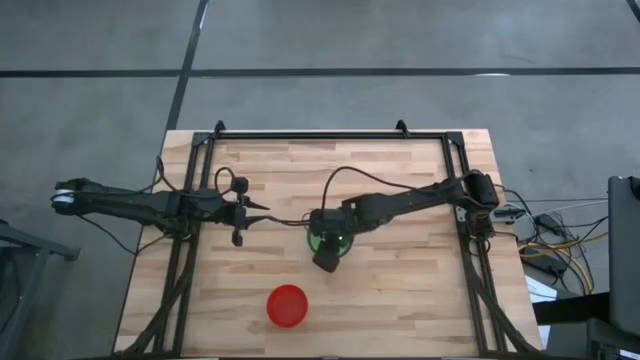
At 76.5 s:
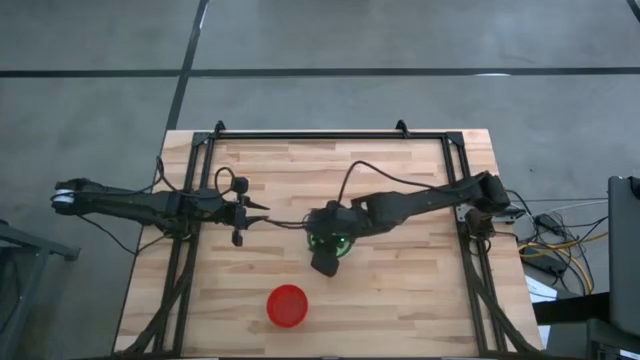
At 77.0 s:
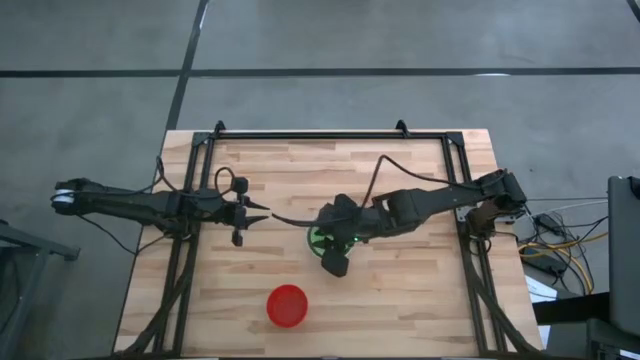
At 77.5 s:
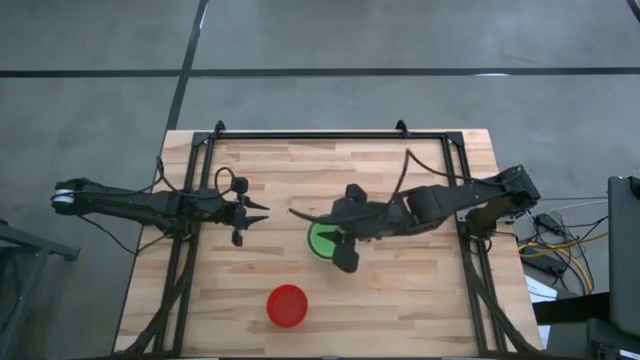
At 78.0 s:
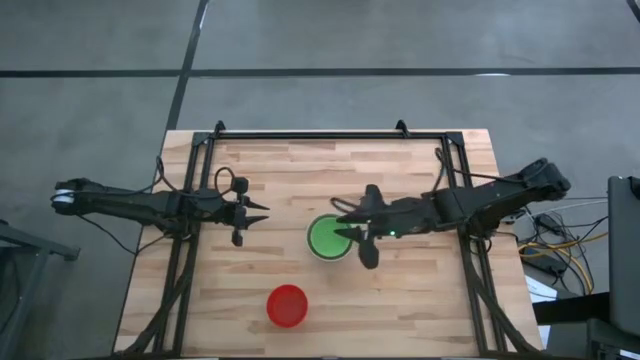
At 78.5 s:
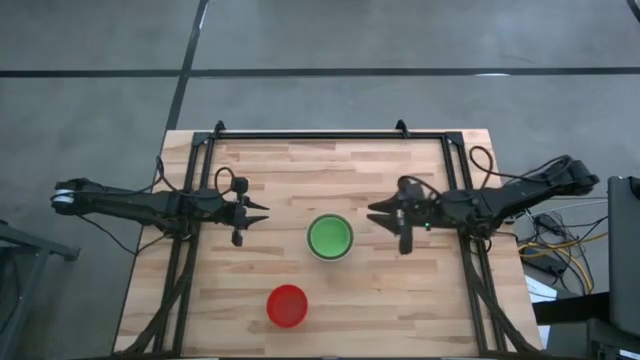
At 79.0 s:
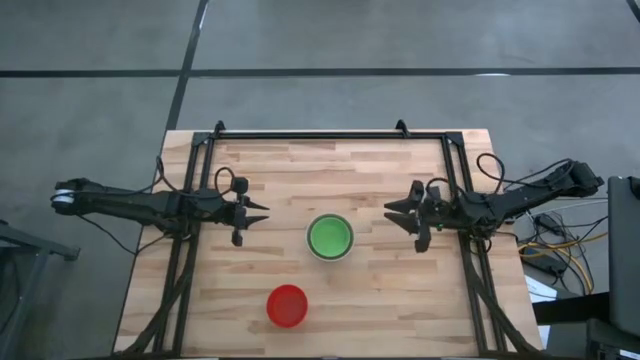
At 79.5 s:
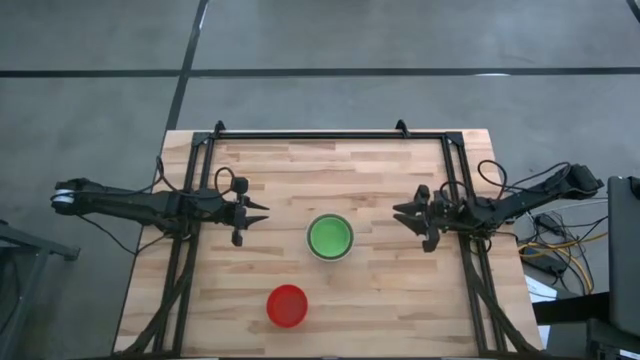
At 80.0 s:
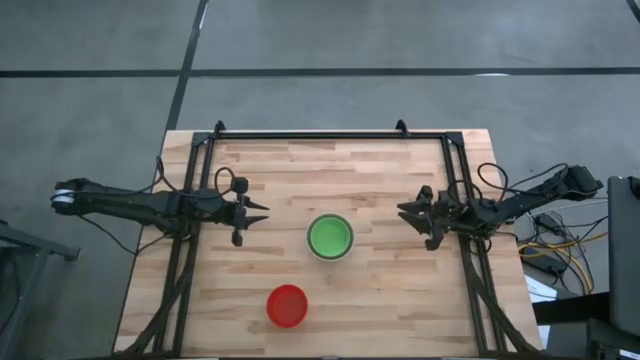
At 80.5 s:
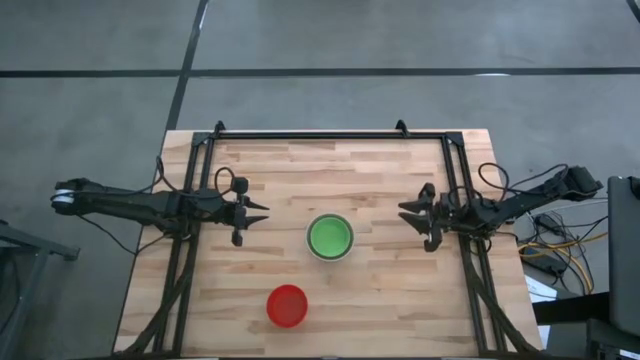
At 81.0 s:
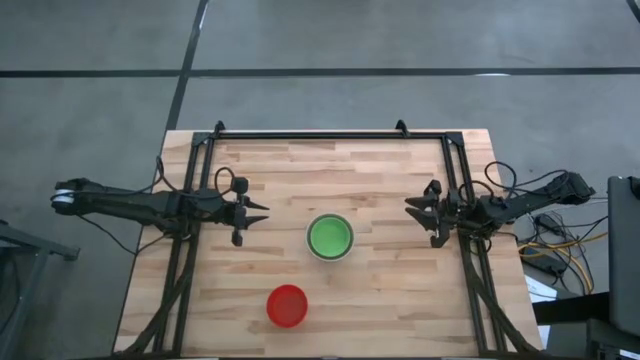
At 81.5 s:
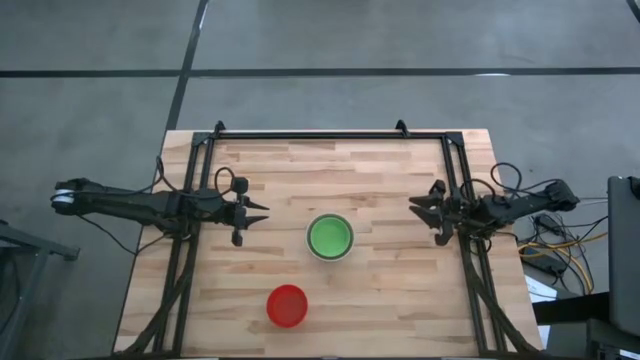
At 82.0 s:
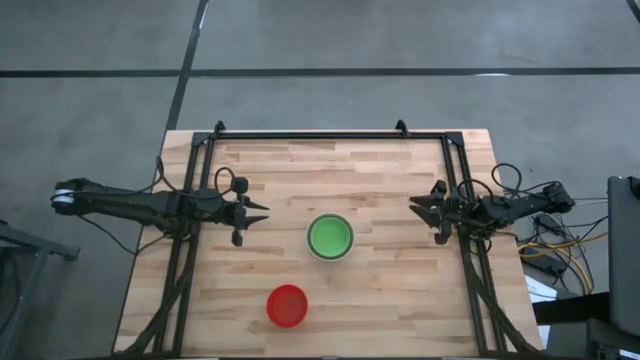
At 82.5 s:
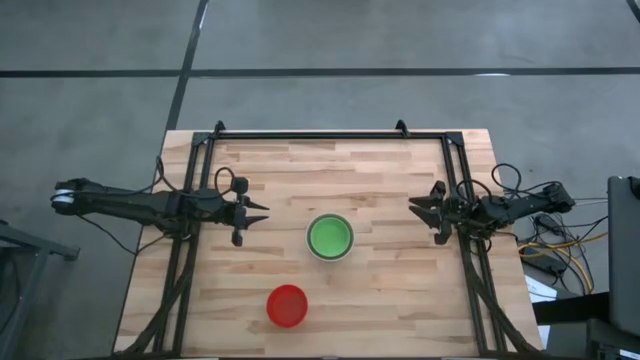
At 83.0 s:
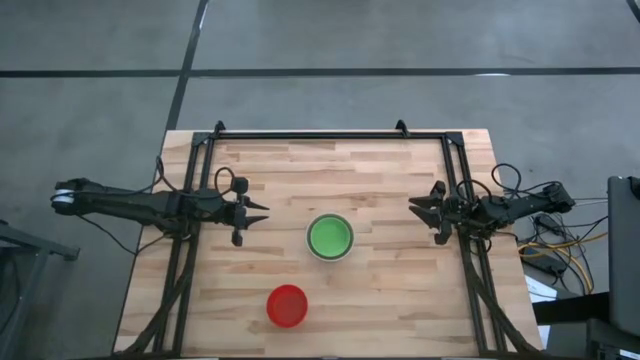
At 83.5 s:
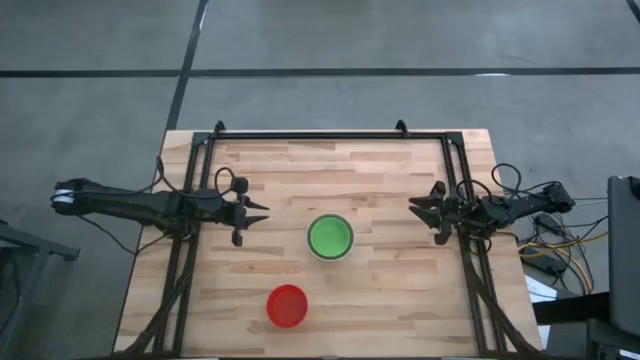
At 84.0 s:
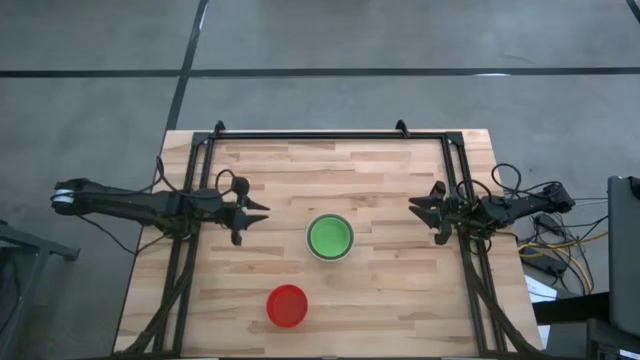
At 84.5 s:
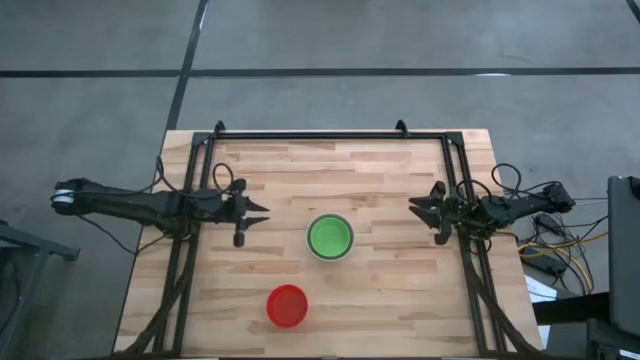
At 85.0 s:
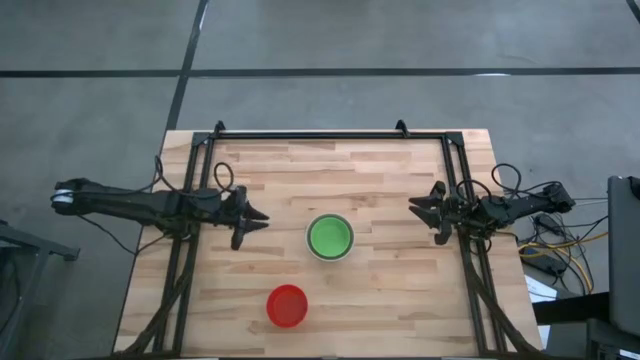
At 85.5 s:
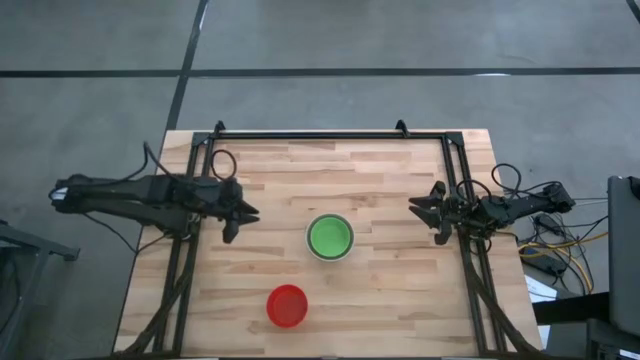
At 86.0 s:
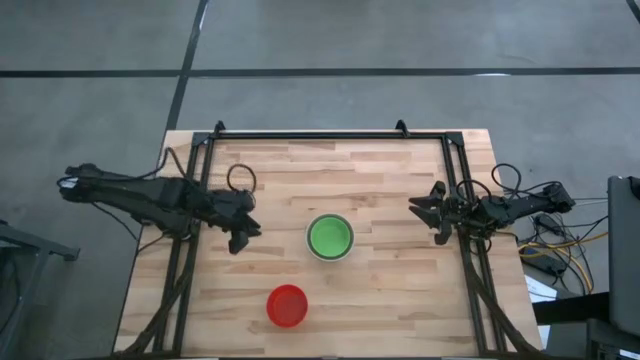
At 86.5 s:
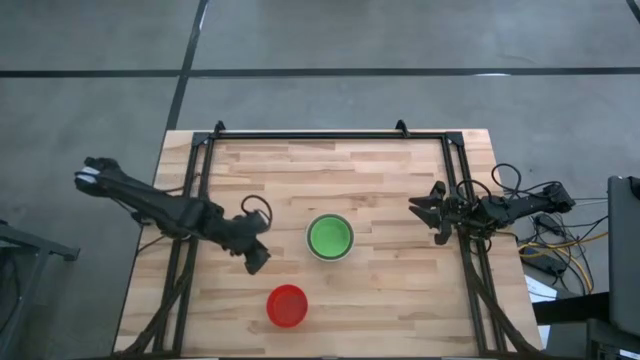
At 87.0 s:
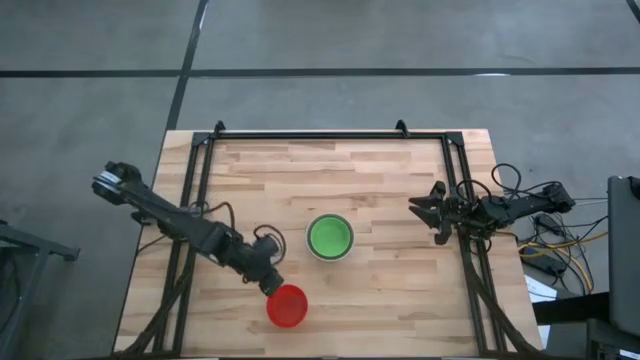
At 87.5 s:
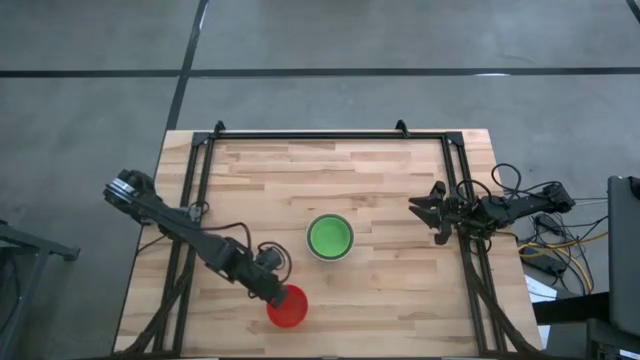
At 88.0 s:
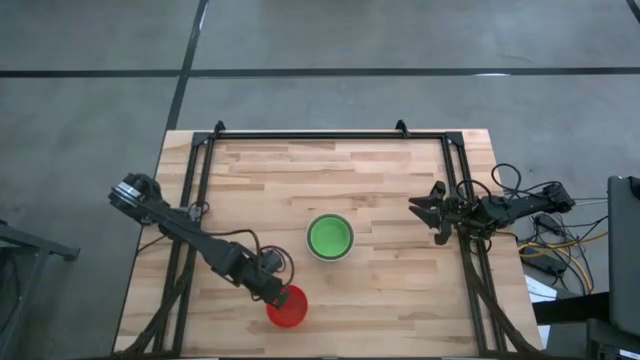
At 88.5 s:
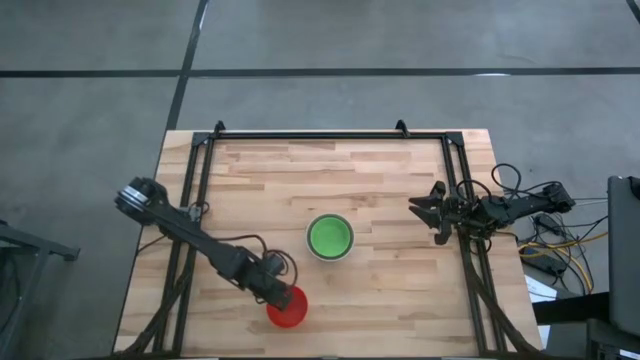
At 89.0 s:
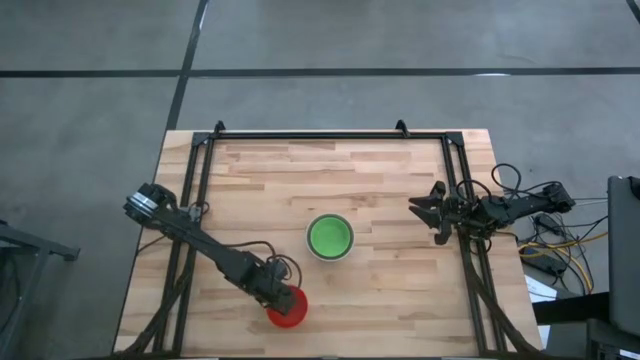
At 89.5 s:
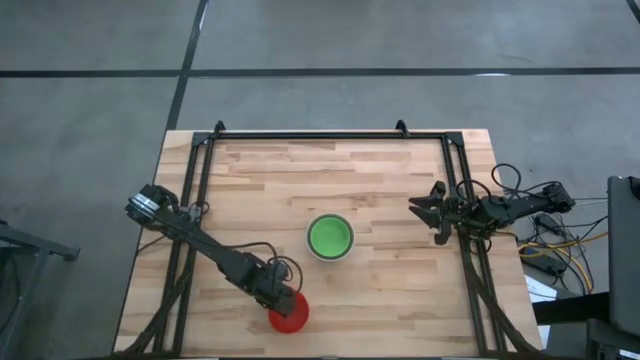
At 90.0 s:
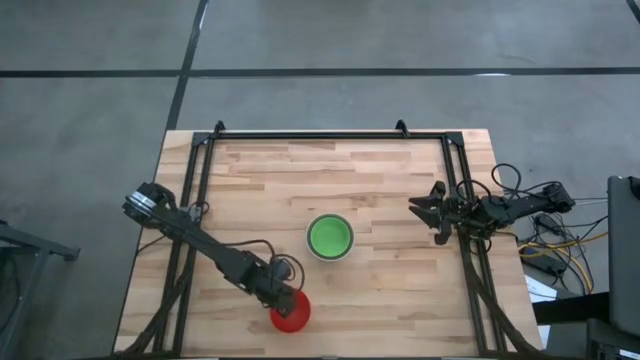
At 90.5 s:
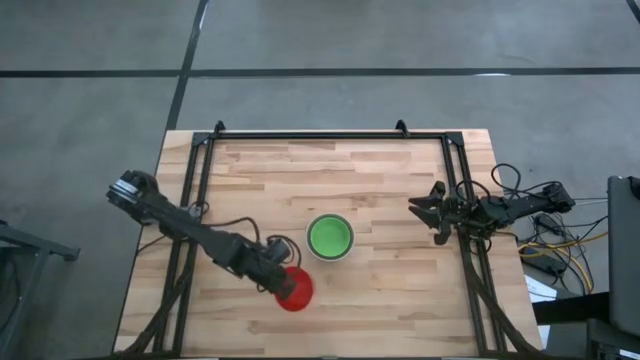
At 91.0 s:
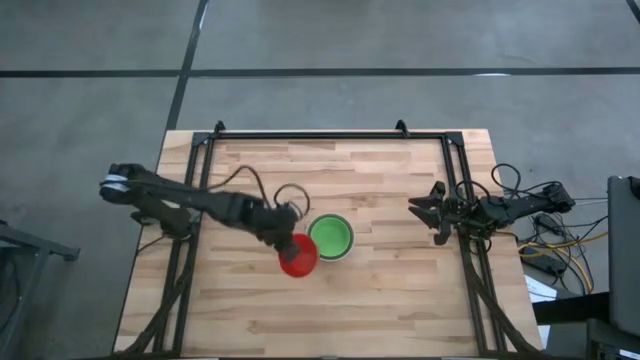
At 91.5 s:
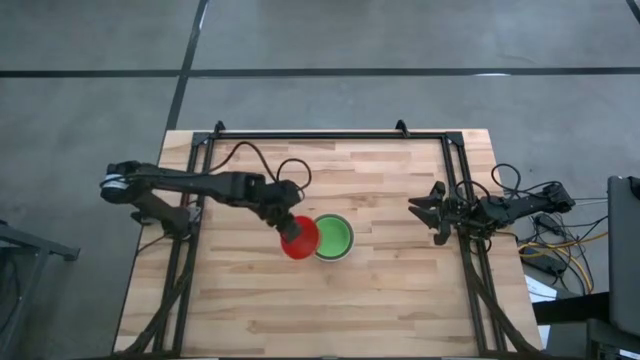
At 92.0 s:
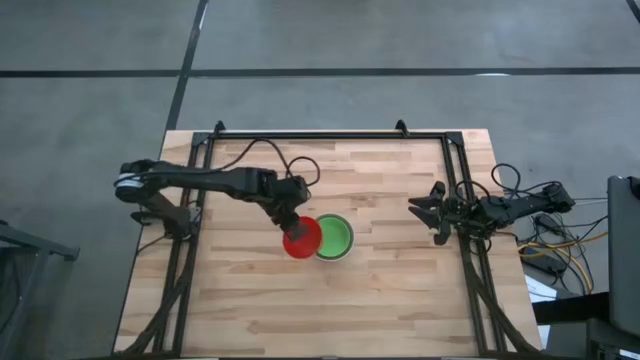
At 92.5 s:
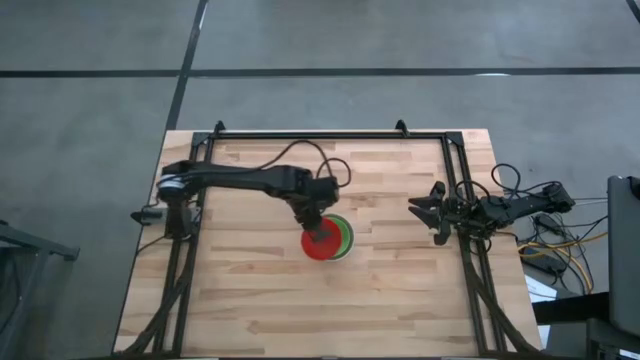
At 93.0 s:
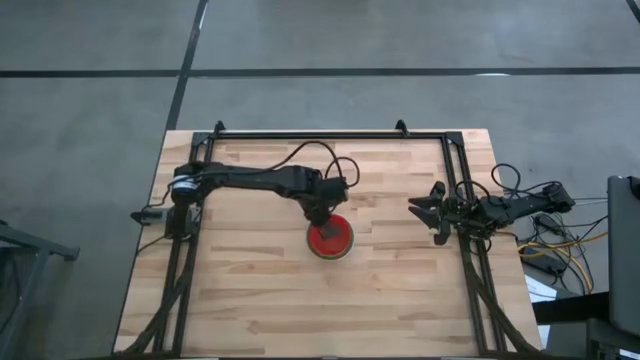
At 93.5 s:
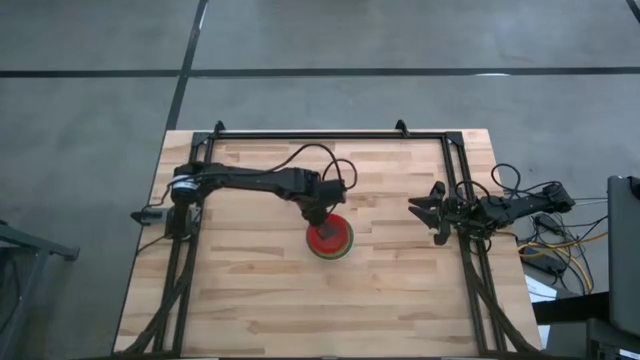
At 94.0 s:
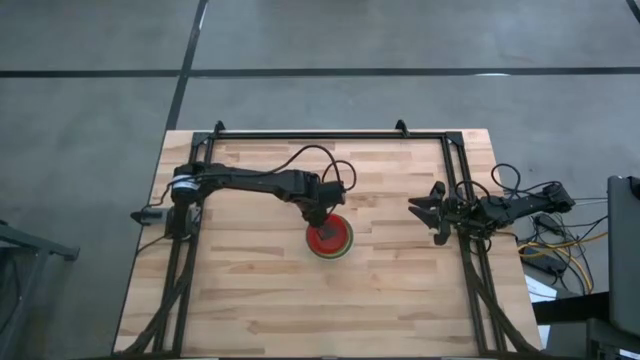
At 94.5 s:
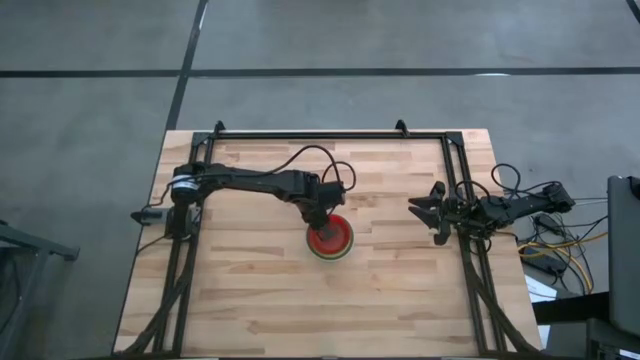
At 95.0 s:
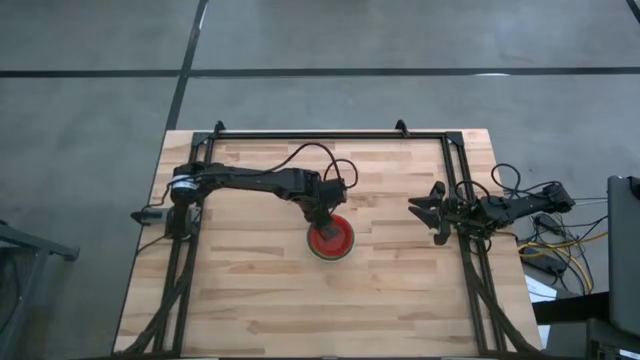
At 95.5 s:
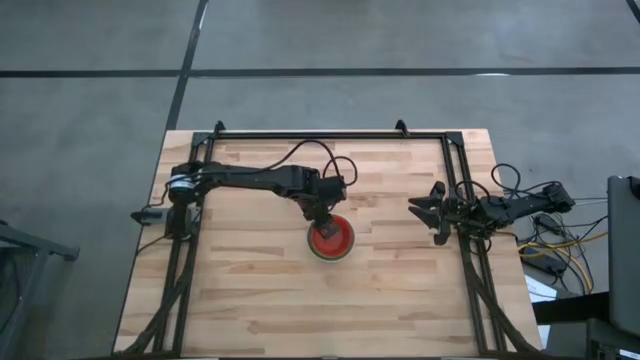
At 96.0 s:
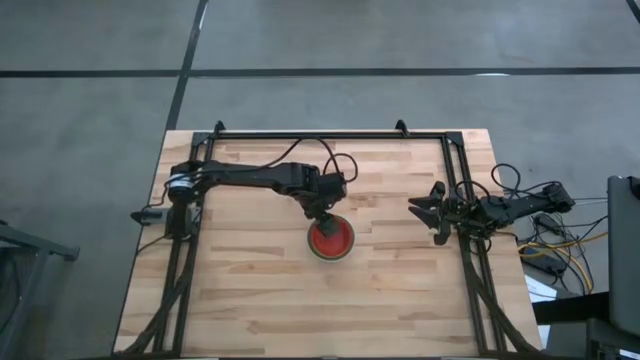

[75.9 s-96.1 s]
Stack the red bowl on top of the green bowl
